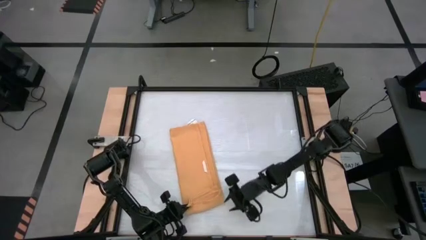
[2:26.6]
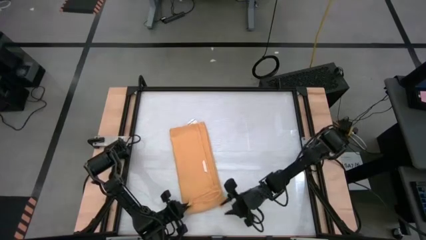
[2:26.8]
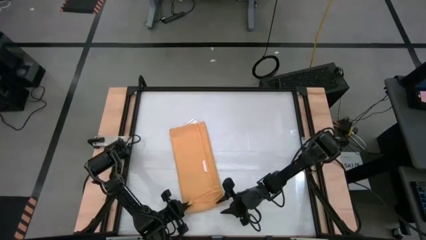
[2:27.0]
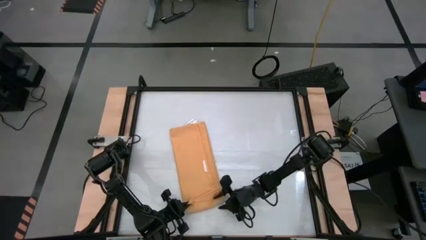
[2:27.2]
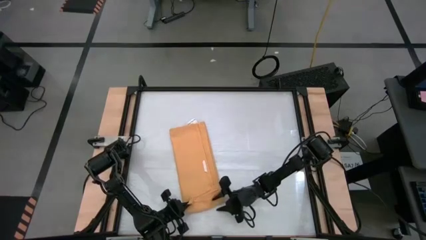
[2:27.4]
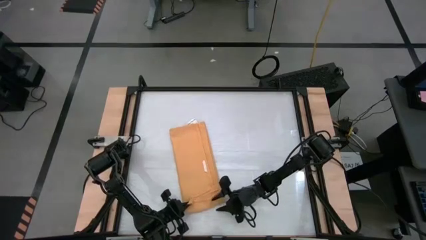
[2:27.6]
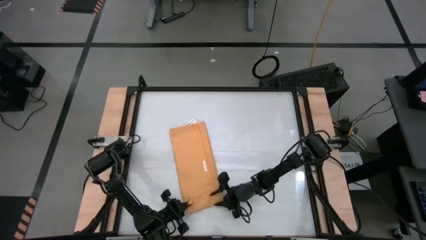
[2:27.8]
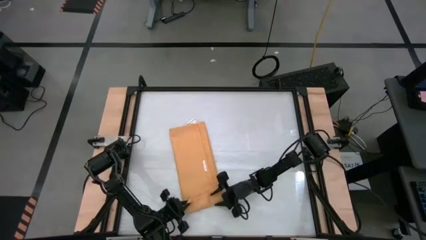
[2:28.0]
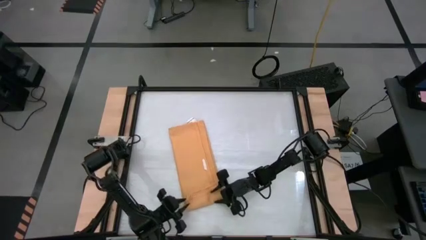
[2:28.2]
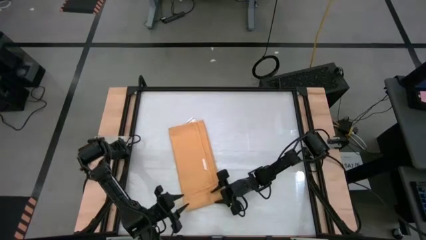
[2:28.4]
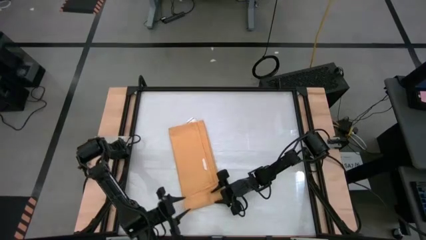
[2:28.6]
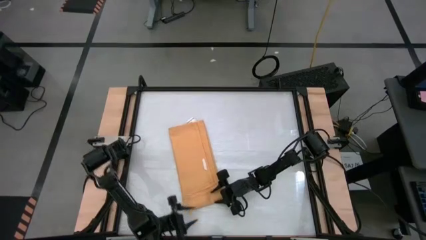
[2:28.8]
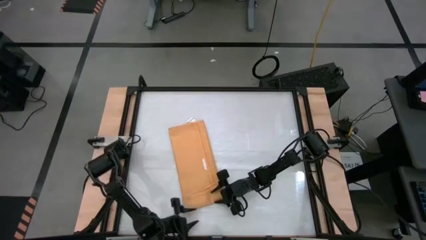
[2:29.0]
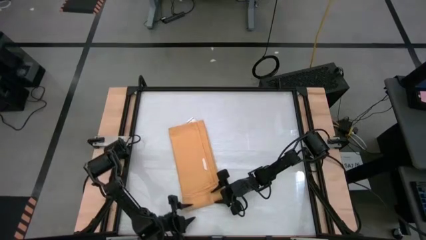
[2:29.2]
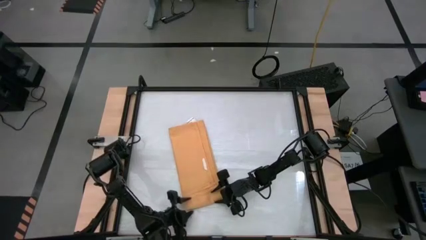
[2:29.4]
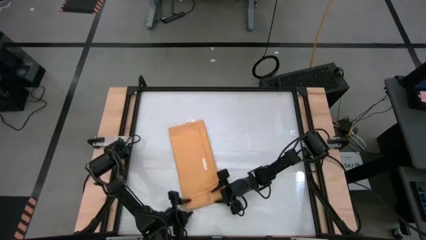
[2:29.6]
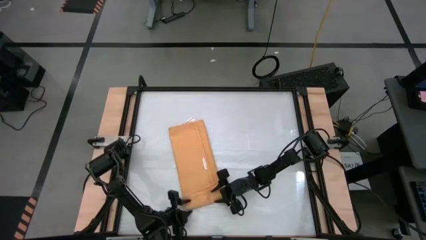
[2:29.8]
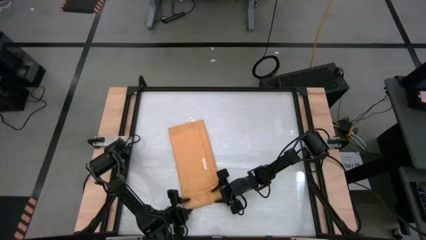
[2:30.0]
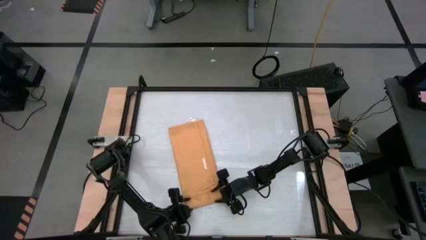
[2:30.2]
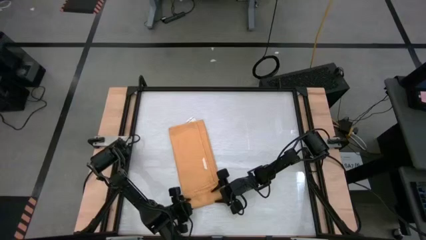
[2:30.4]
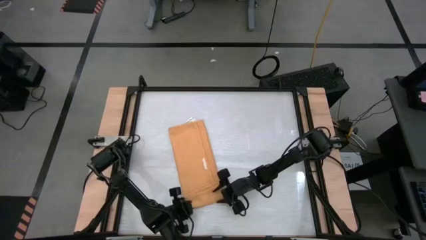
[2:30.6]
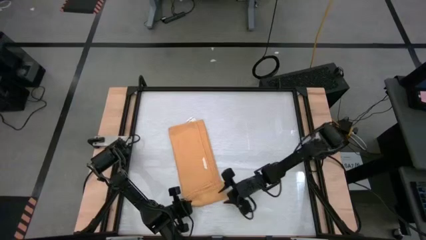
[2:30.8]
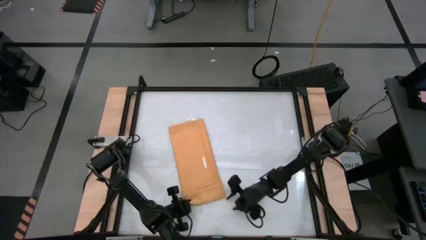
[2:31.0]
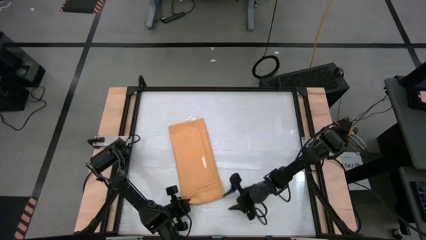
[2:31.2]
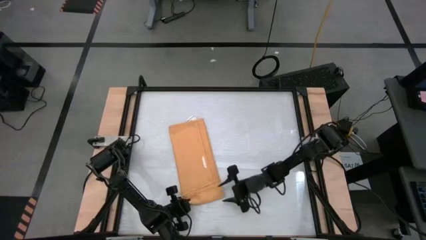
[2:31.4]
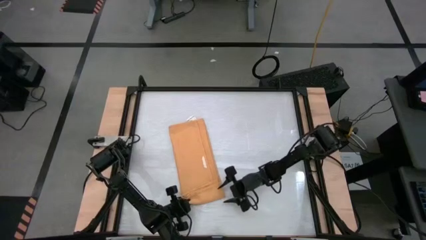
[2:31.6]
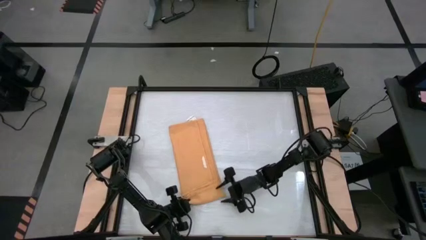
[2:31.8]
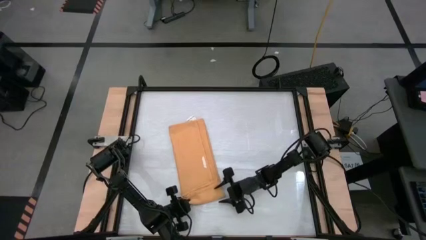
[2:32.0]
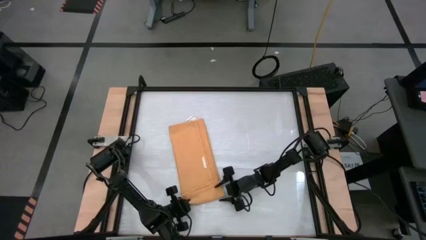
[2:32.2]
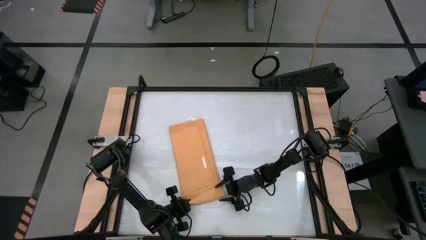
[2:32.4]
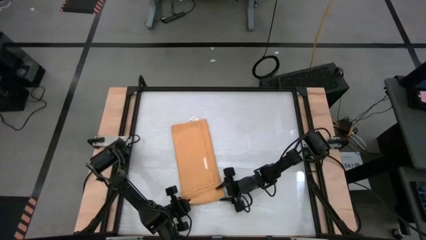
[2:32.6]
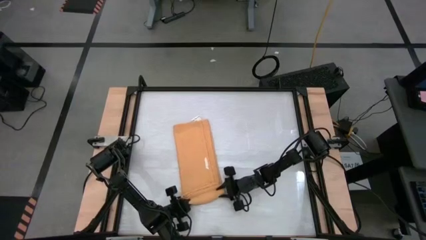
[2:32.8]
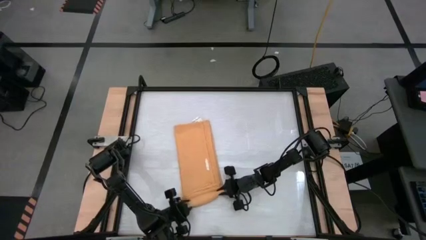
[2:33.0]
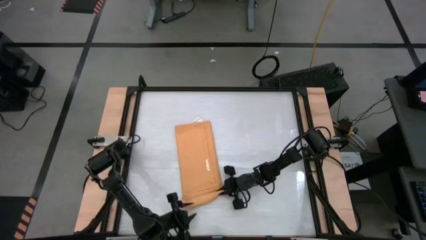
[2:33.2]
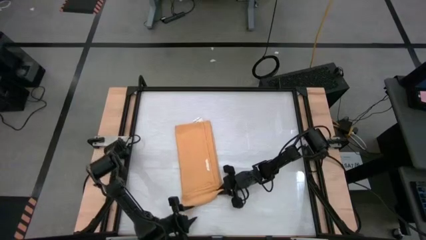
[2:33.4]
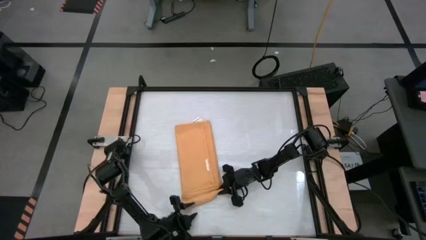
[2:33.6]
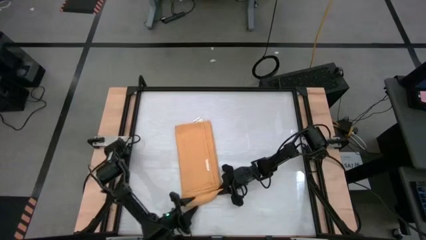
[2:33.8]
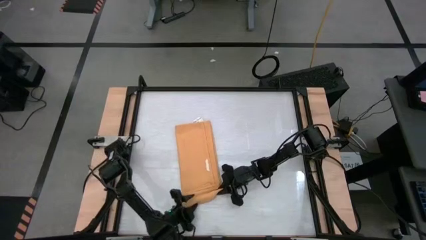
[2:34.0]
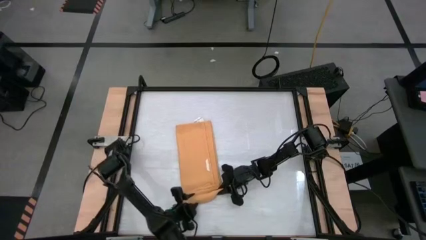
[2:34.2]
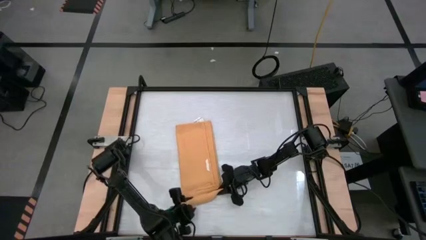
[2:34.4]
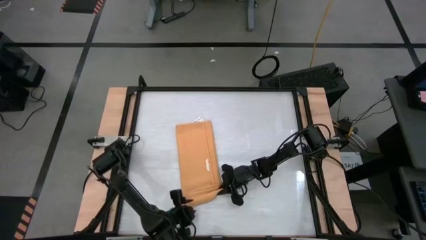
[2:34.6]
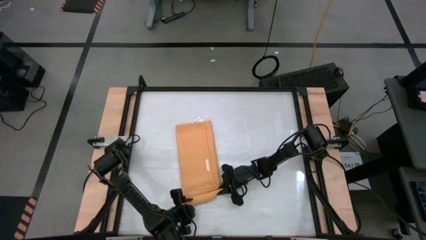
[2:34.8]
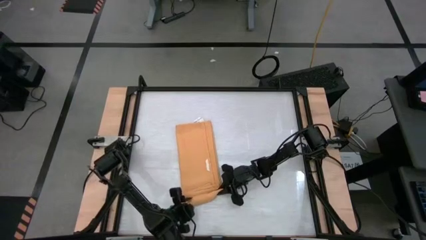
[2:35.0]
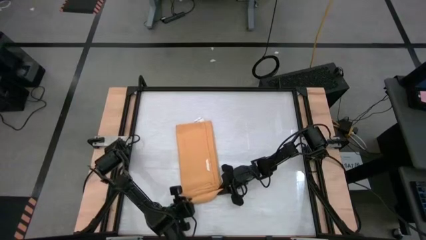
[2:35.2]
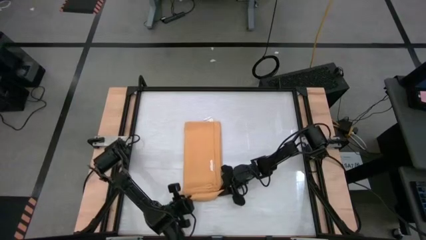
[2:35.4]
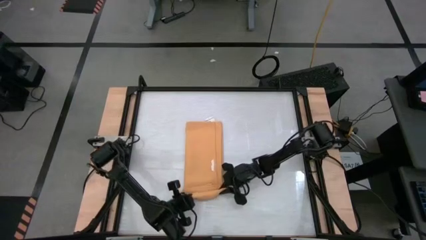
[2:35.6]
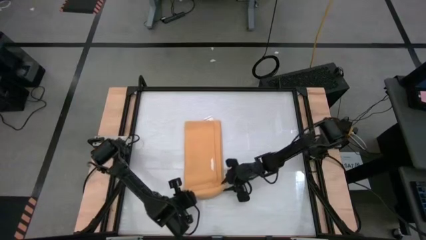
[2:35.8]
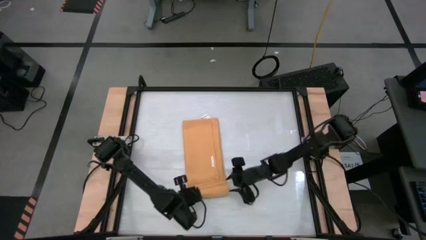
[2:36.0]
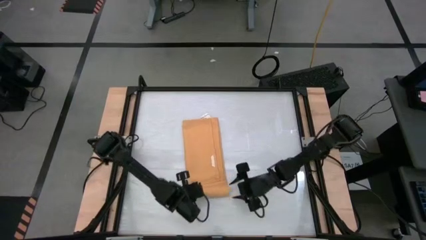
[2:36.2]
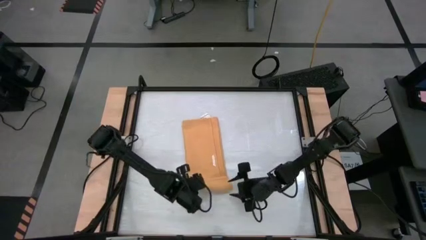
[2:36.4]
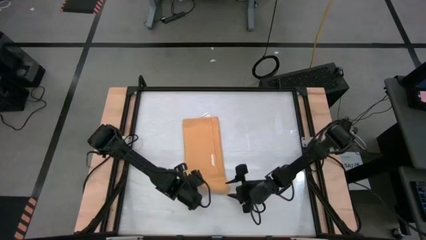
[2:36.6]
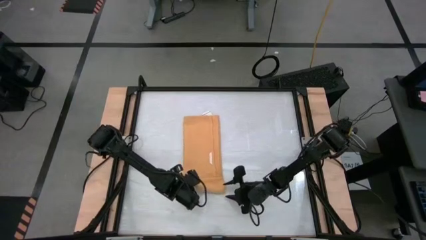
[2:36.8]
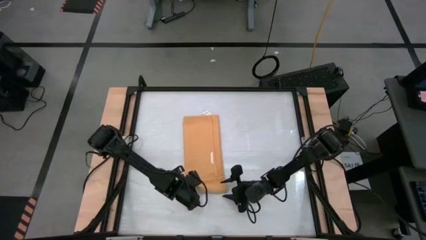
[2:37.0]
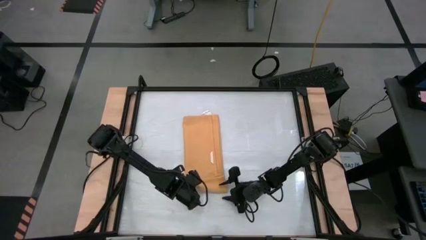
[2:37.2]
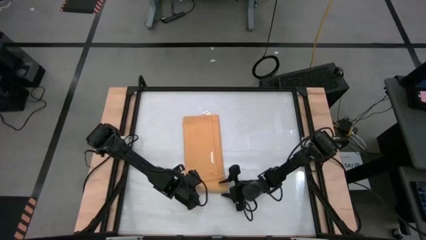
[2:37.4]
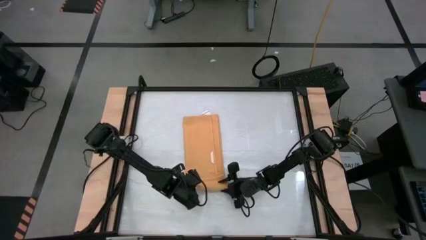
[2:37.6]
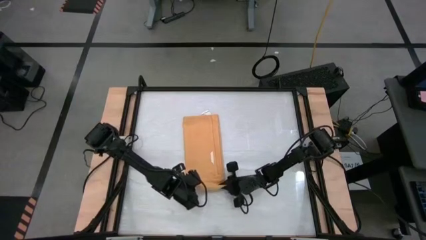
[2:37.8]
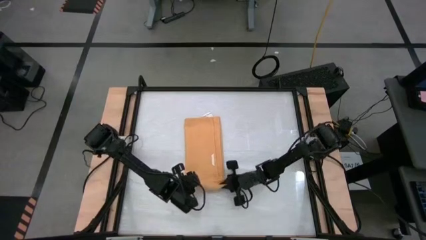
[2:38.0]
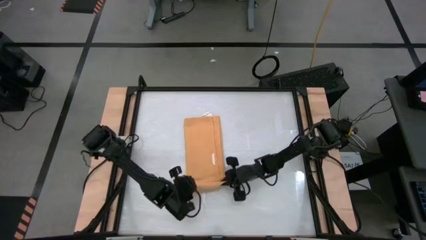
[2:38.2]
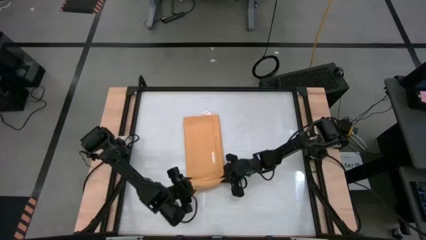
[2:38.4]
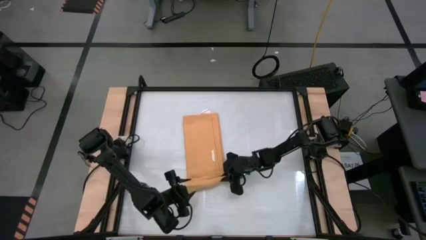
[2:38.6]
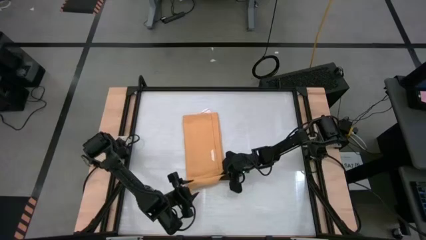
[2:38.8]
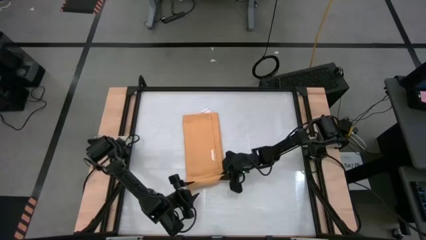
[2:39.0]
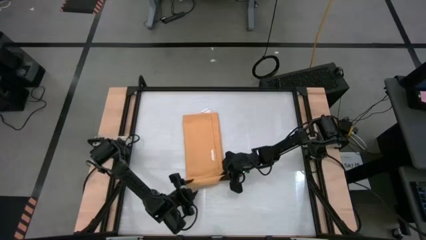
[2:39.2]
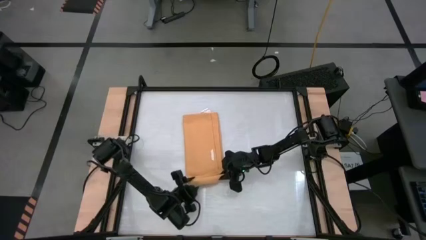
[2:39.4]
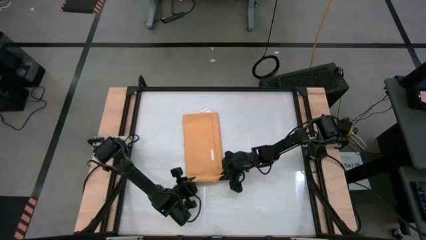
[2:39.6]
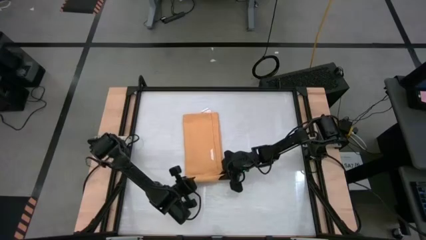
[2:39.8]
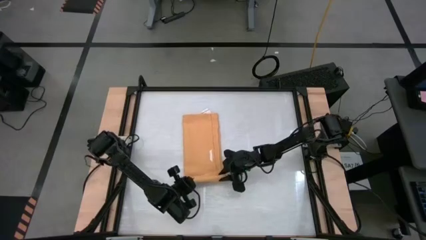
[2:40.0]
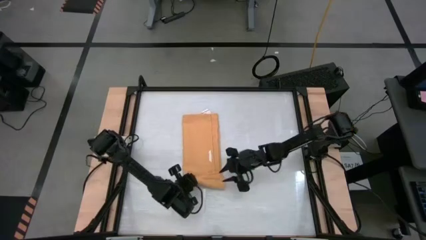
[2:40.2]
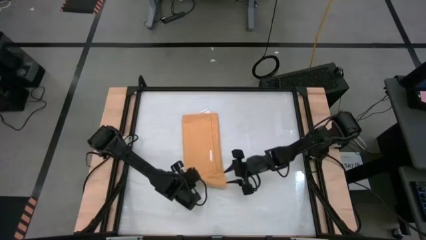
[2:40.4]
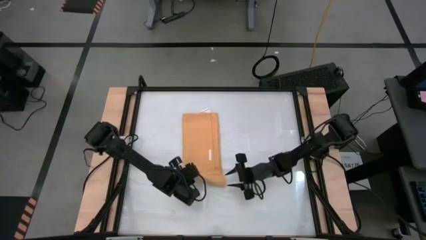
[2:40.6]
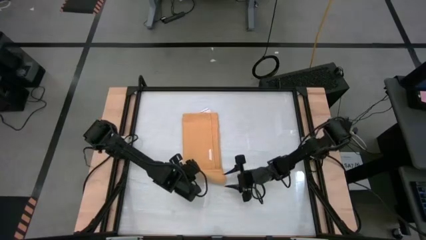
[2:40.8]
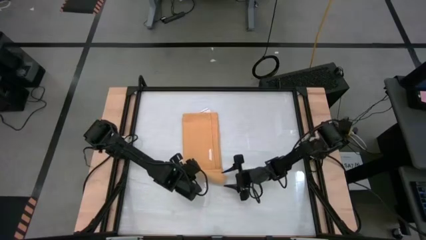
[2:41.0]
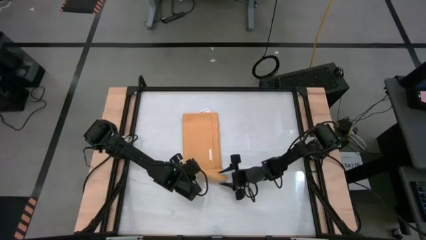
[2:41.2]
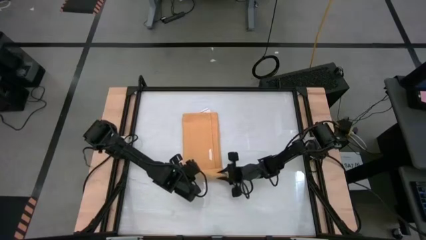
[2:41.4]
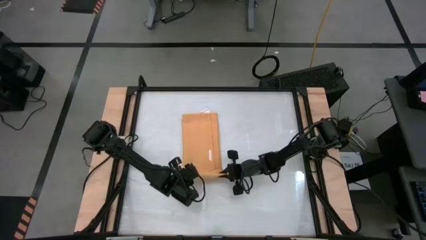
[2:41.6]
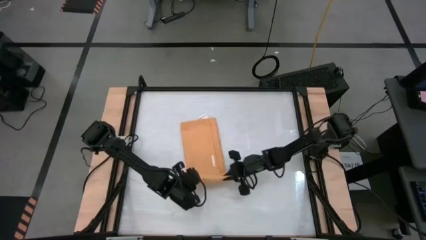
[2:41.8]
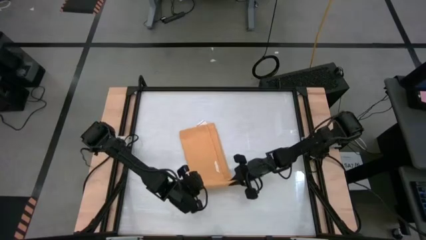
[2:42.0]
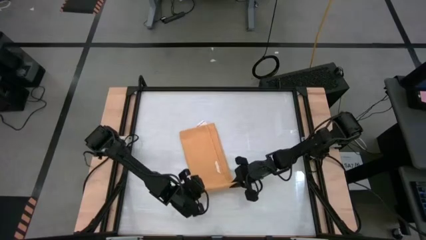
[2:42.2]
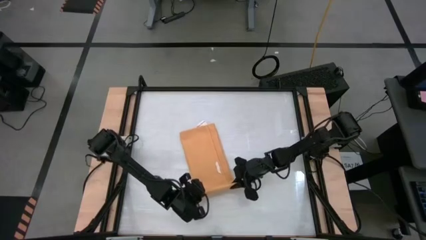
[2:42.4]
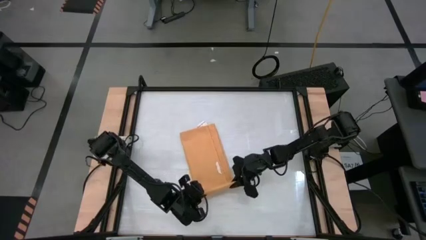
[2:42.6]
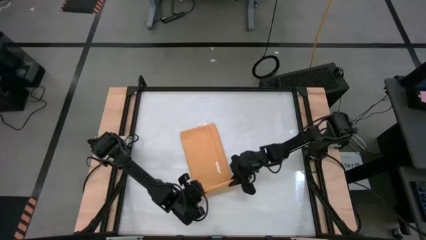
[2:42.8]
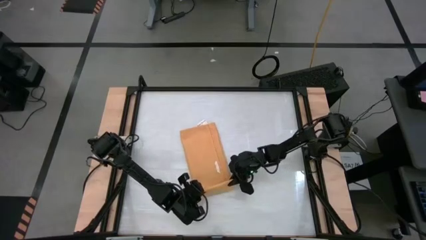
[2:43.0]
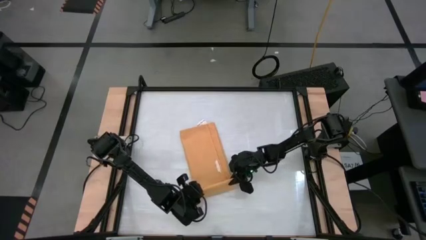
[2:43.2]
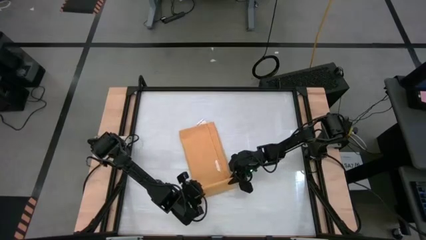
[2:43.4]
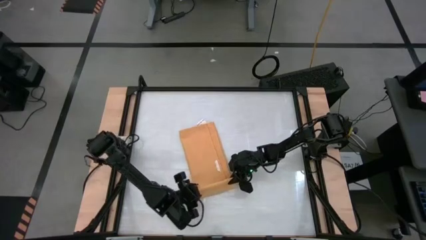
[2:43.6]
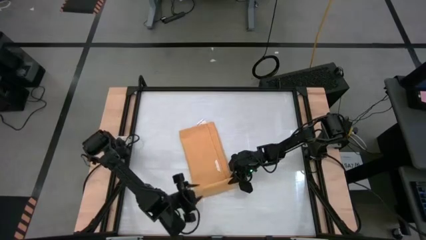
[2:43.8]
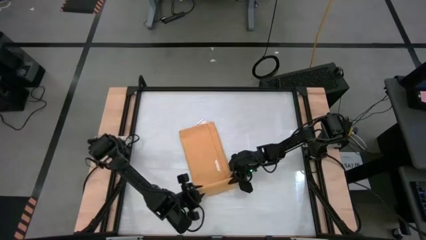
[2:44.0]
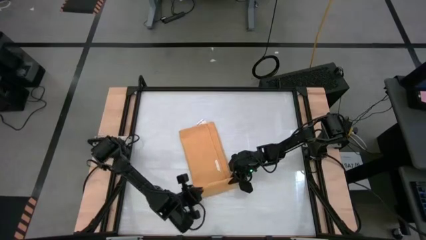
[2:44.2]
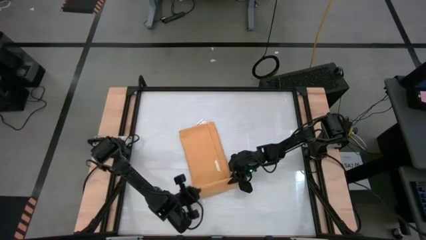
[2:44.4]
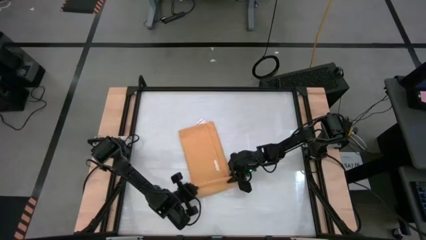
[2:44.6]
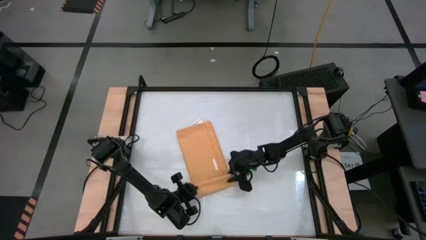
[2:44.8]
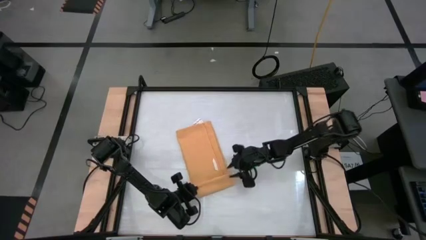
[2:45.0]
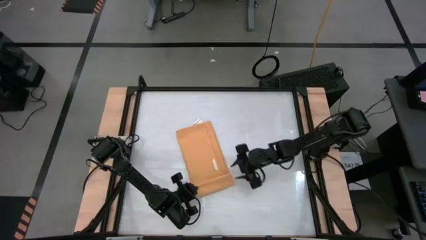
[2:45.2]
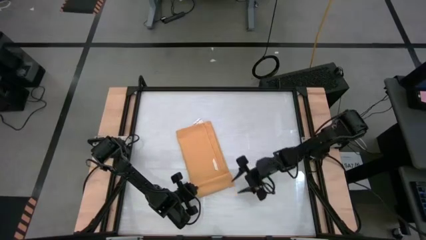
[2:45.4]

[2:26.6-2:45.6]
Task: Roll towel
Roll the yellow towel
